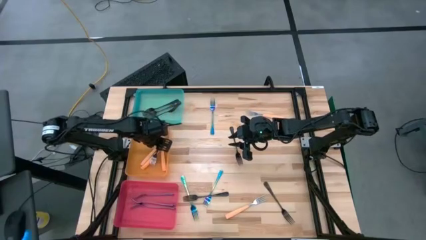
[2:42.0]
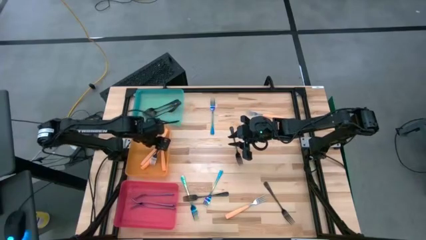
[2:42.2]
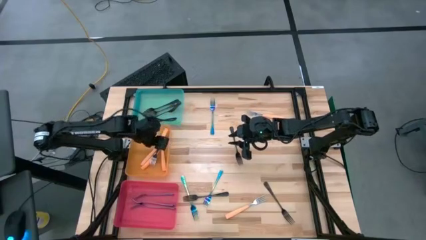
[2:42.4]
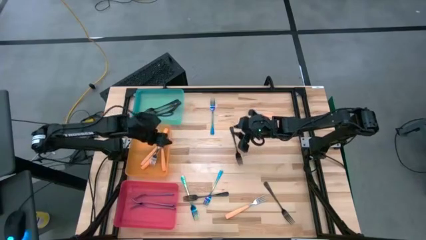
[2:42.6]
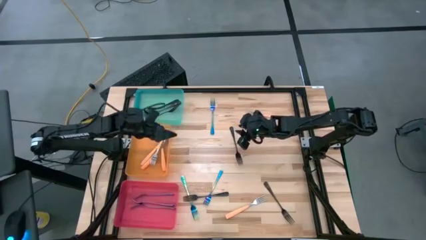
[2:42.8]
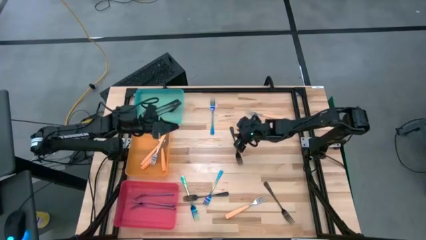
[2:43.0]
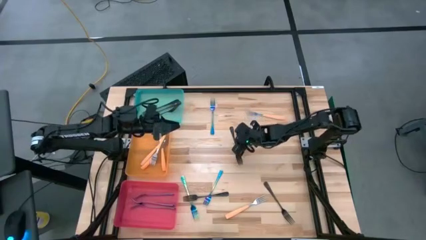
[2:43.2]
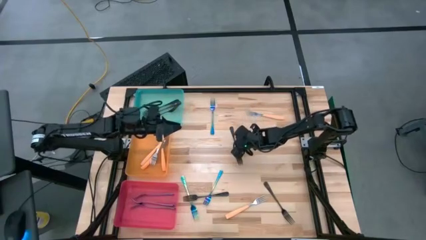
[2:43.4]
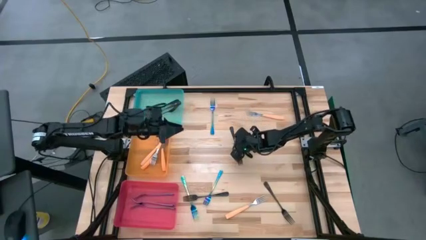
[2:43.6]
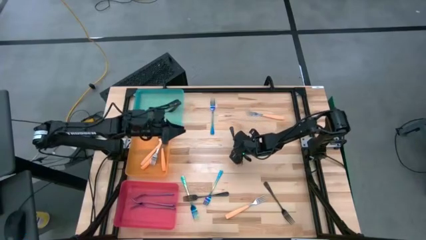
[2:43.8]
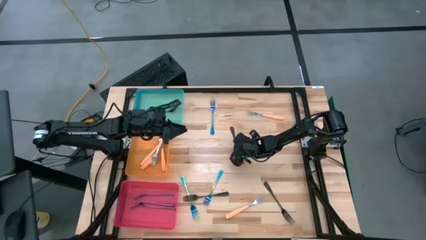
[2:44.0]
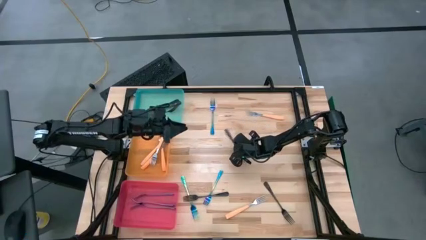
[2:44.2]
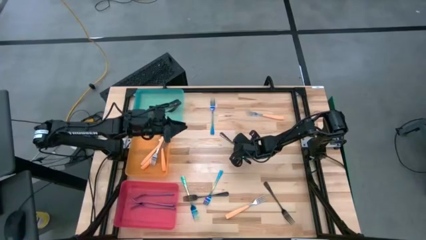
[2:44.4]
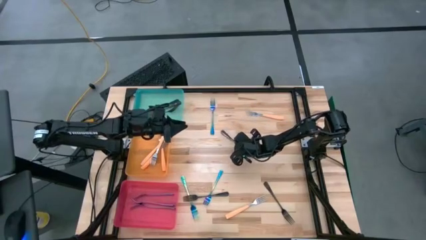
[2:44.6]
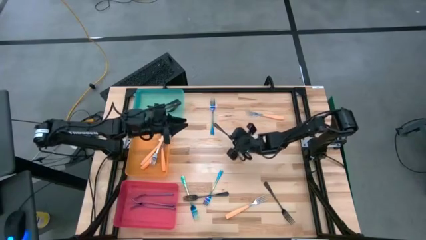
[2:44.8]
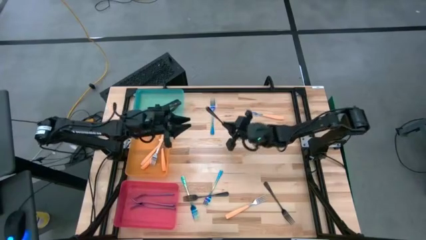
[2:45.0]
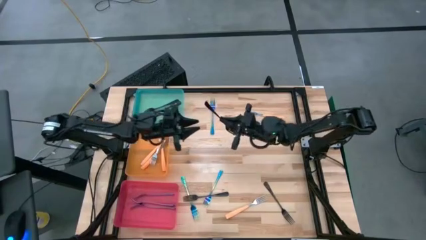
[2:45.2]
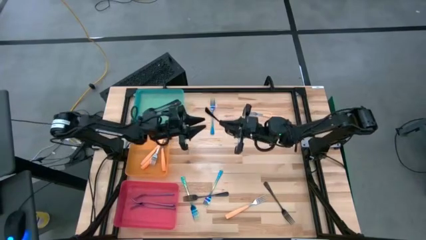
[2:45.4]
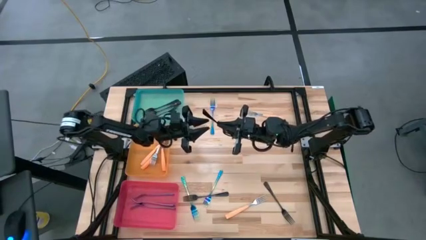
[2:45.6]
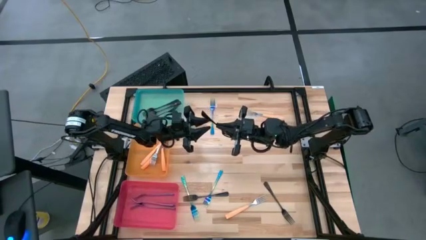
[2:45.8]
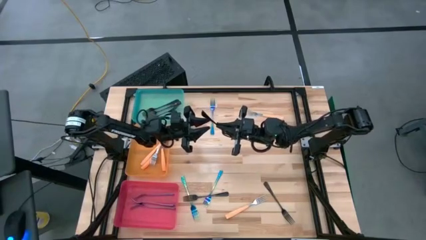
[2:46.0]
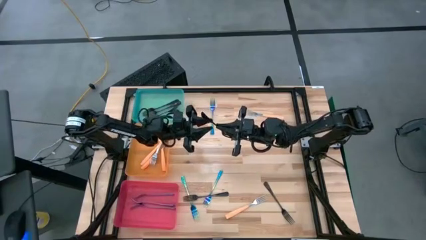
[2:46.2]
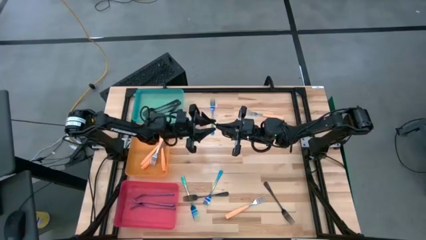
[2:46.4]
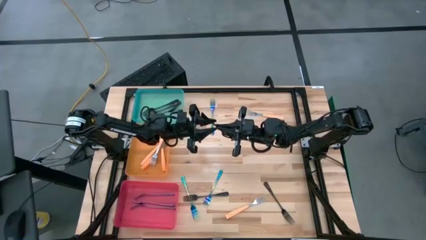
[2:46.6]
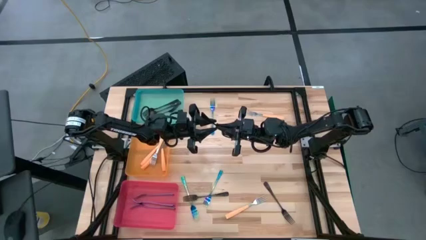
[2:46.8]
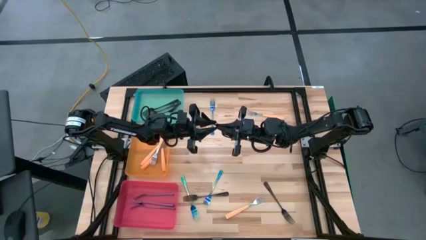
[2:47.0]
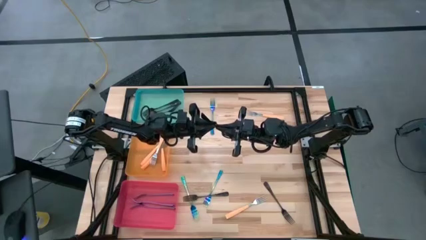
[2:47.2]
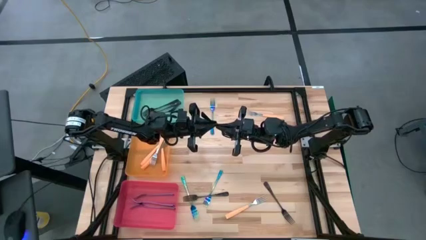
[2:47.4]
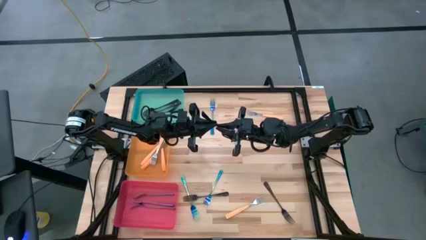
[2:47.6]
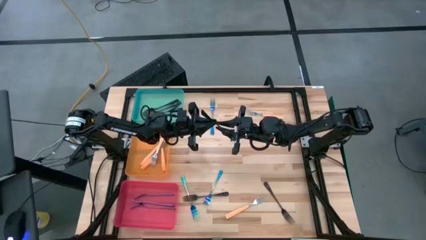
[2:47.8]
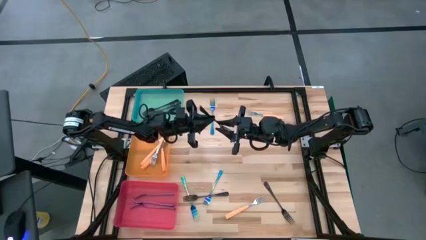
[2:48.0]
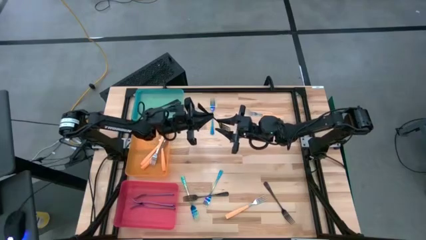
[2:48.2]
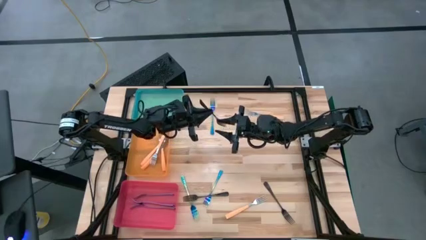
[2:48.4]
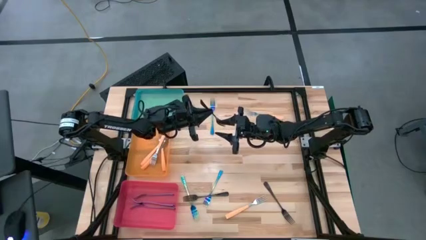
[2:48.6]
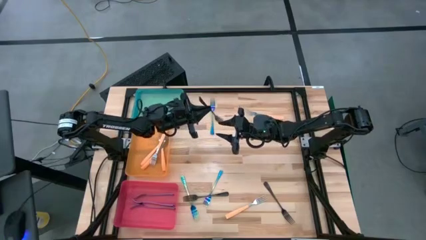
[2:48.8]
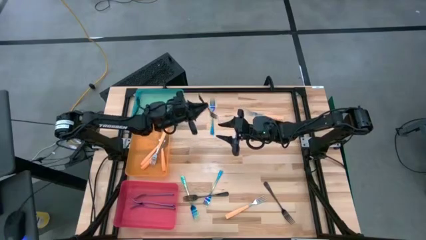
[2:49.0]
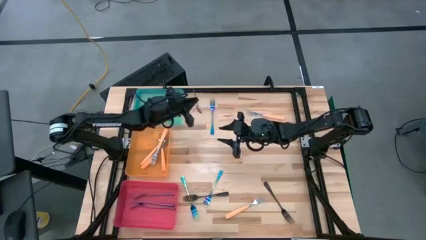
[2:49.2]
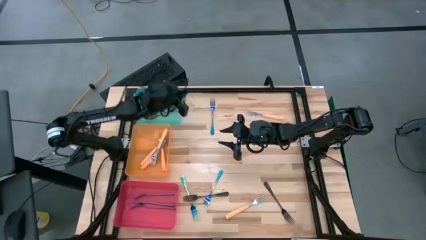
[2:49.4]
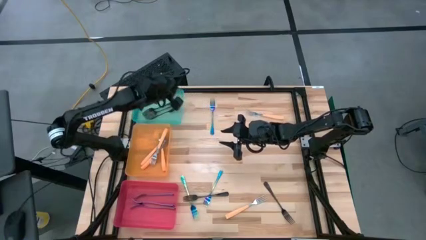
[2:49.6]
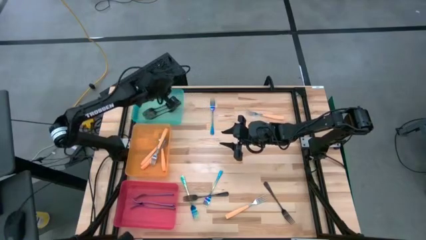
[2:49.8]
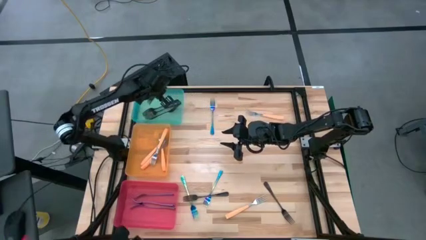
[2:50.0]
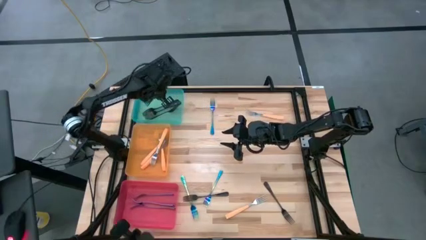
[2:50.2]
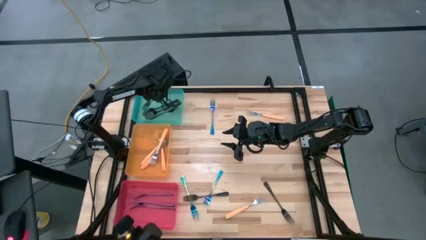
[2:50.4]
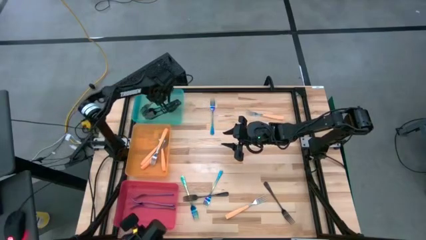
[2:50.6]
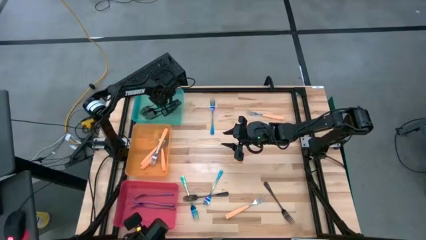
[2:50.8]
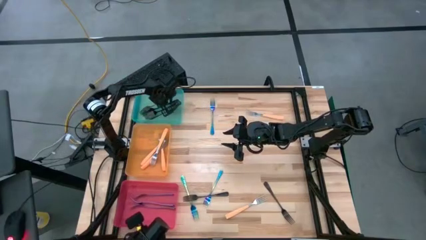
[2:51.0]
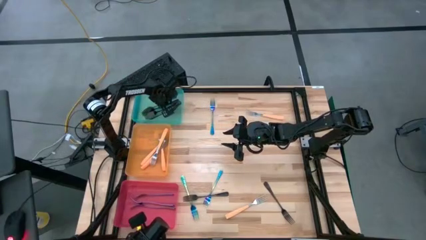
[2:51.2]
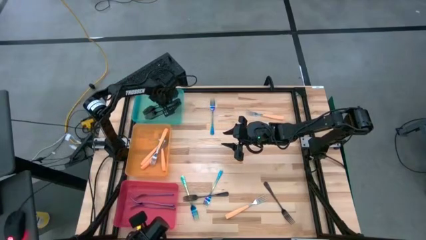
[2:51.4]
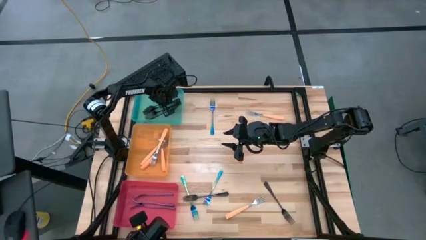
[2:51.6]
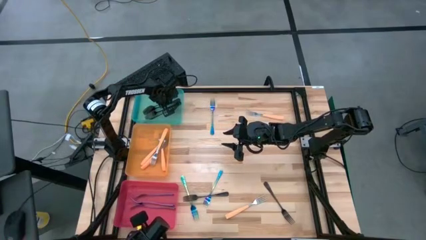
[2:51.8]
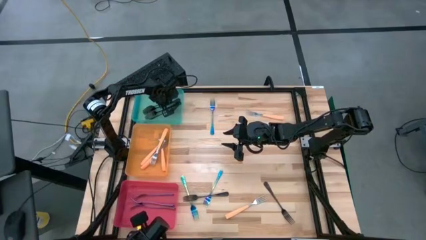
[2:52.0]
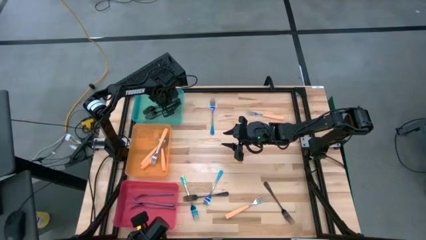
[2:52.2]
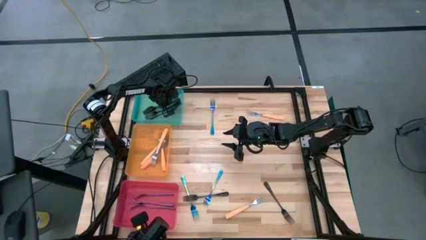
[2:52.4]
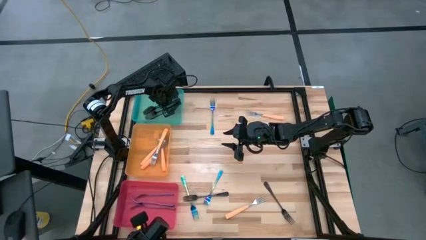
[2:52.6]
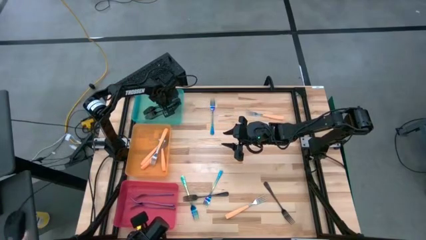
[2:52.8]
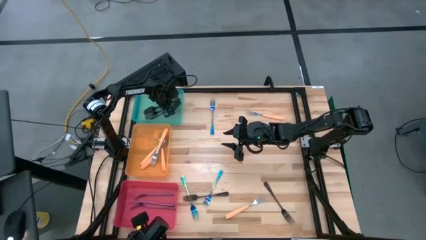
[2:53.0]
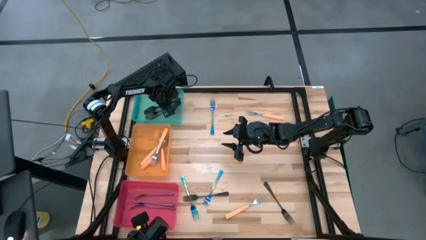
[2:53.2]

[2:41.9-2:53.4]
Task: Sort silverware by color (type)
Put the black fork into the blue bin

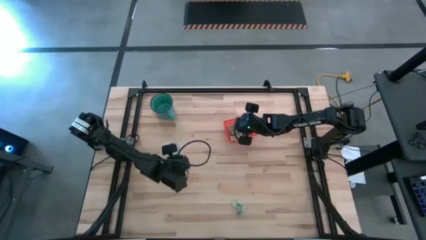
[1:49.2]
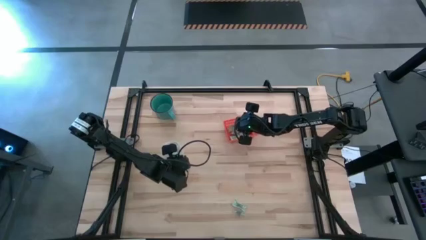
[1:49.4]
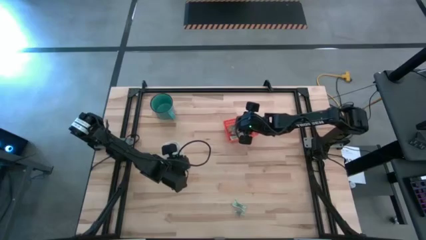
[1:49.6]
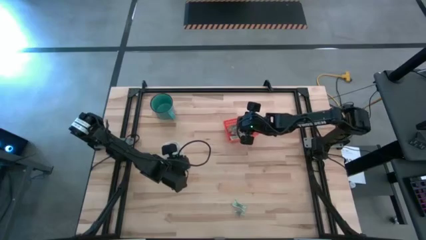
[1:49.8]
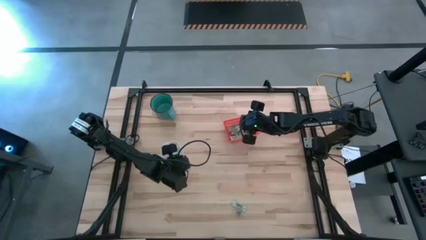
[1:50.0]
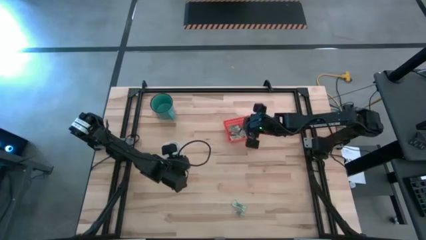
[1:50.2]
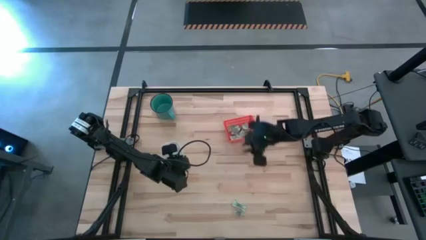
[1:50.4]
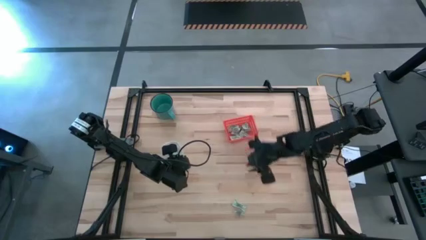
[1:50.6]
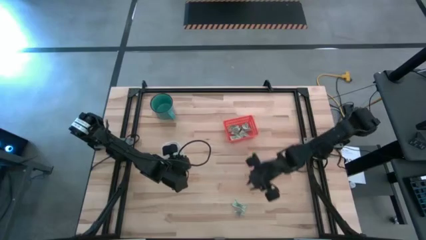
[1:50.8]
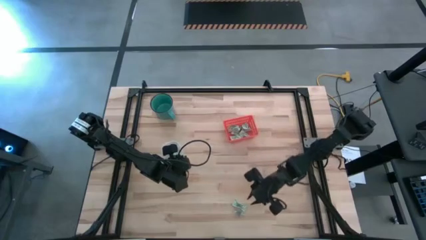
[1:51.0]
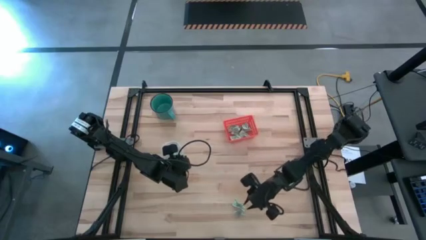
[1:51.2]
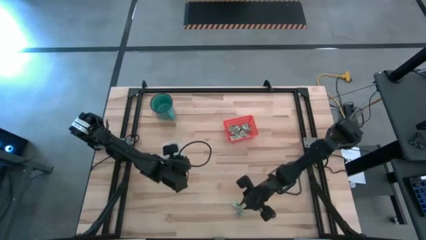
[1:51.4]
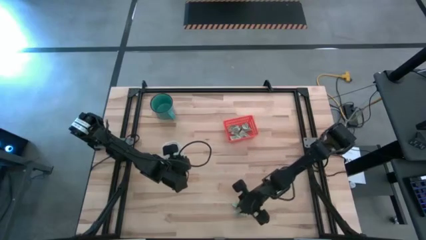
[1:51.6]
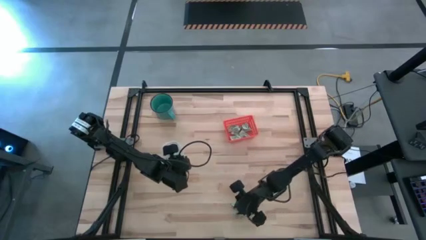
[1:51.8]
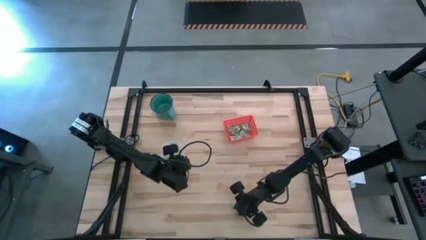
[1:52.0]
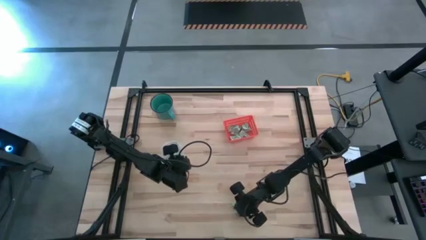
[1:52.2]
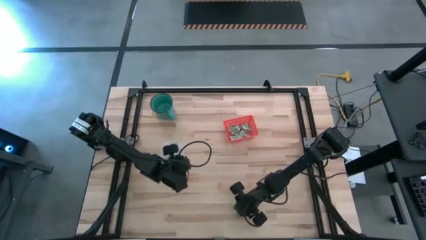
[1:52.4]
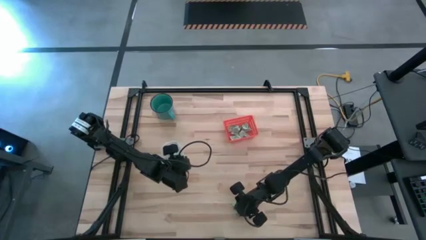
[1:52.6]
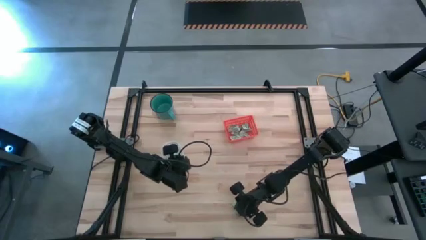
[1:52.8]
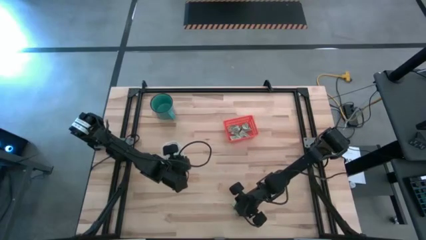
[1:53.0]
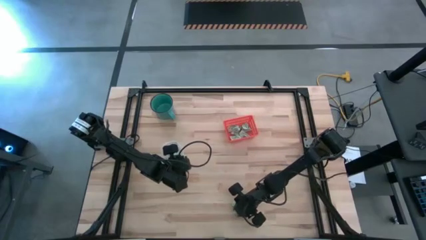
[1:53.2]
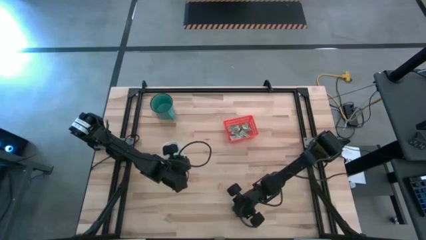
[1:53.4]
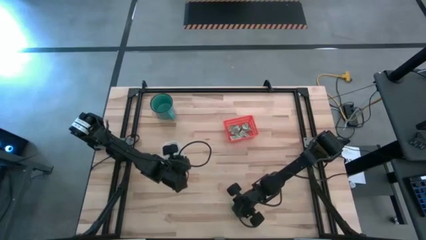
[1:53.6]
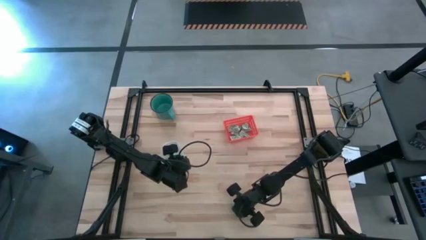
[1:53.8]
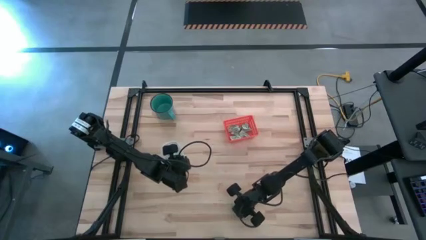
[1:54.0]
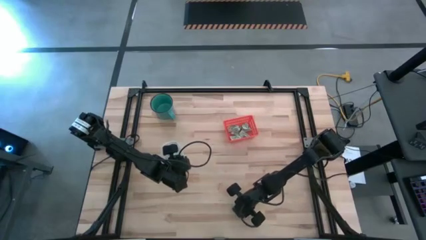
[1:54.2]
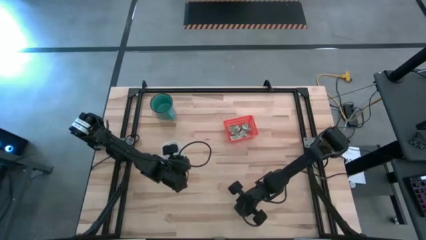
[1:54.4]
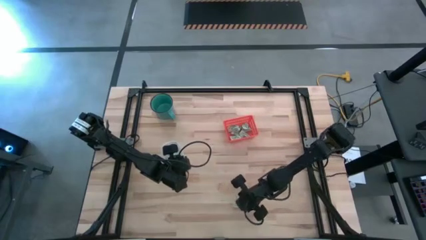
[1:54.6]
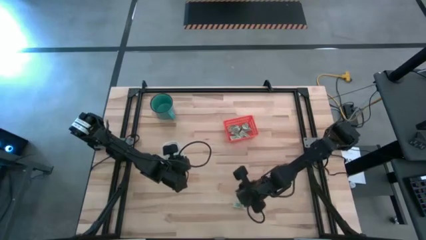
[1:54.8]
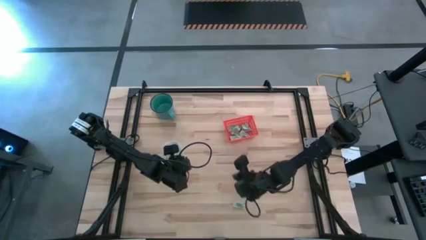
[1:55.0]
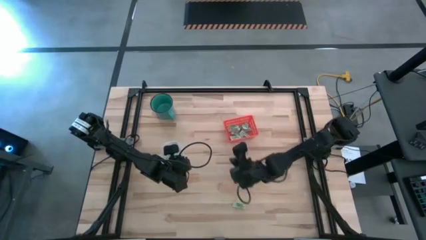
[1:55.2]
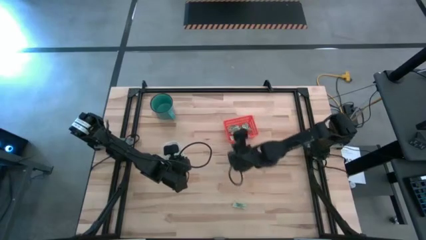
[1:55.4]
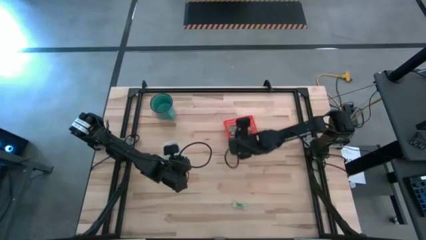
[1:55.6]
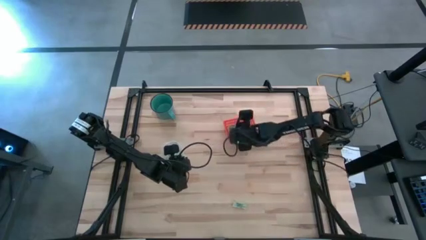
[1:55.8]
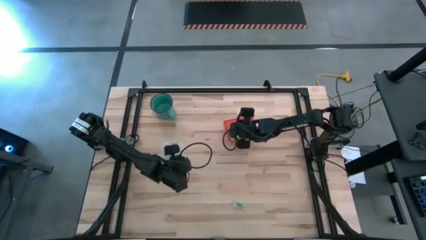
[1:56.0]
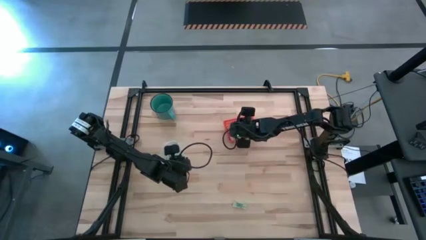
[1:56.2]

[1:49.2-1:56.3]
Task: Pick and place items into bin
Put the light green stevia packet into the orange bin
